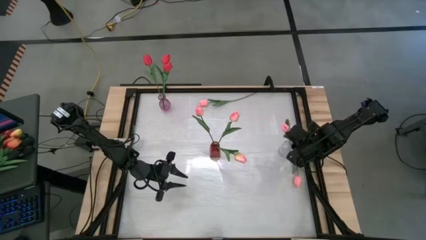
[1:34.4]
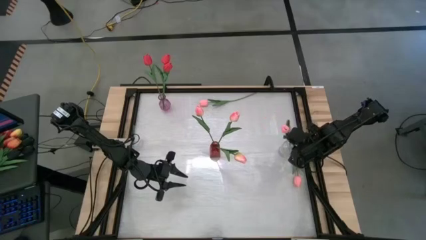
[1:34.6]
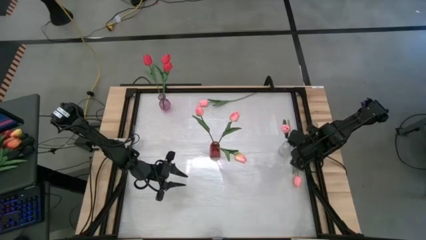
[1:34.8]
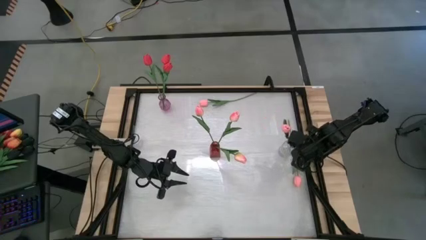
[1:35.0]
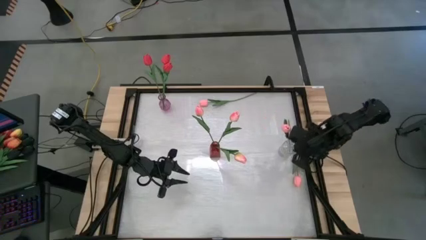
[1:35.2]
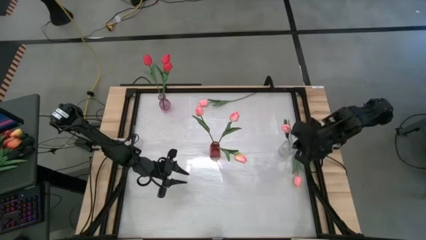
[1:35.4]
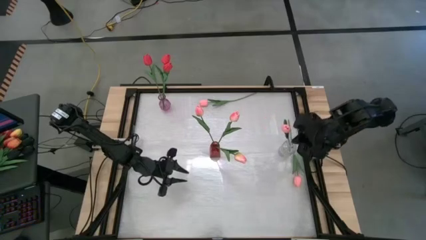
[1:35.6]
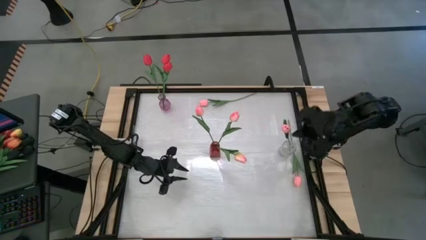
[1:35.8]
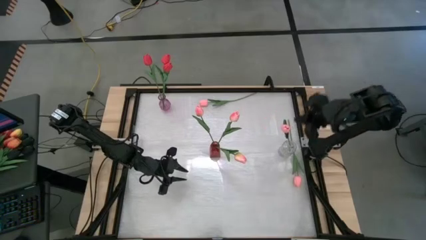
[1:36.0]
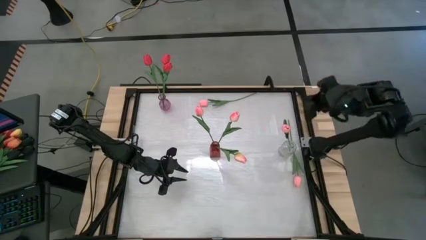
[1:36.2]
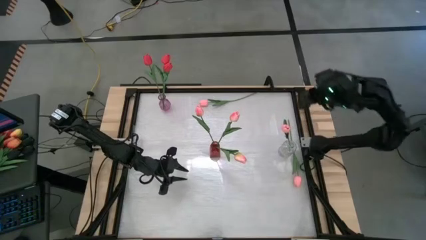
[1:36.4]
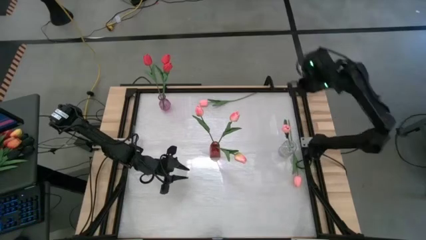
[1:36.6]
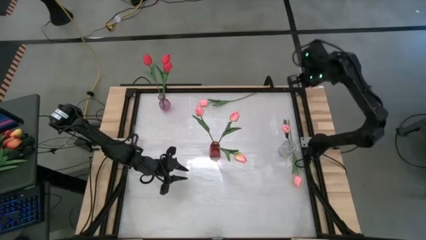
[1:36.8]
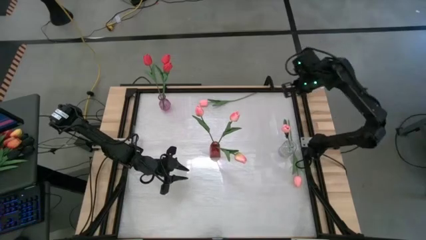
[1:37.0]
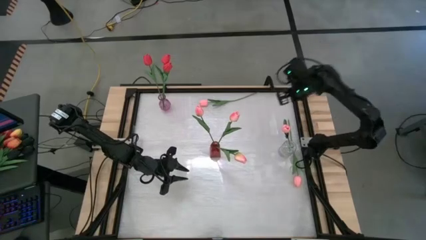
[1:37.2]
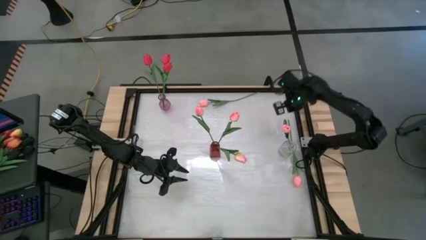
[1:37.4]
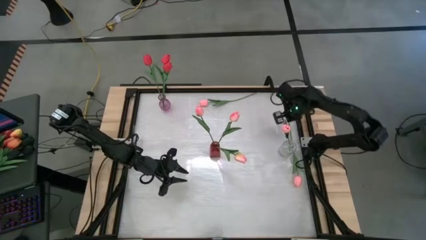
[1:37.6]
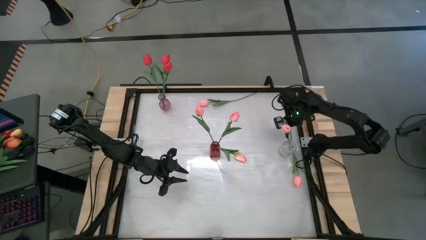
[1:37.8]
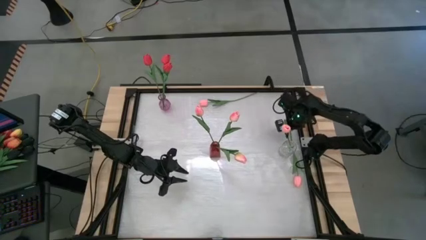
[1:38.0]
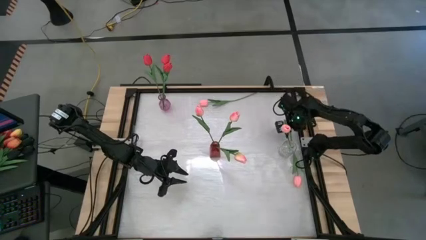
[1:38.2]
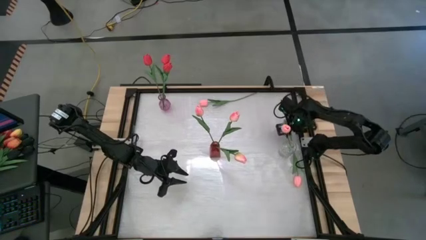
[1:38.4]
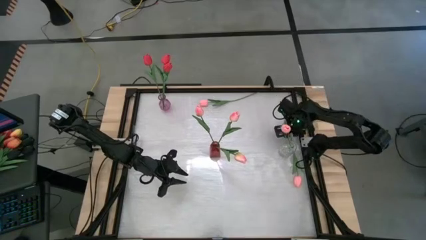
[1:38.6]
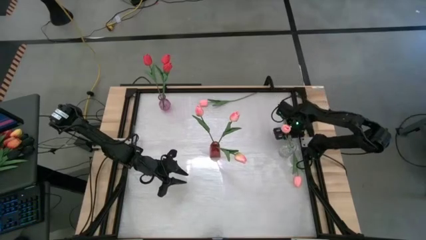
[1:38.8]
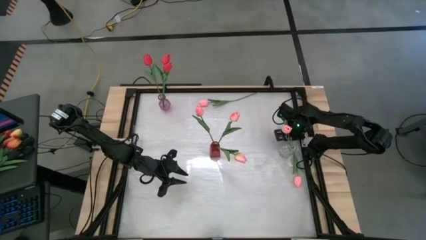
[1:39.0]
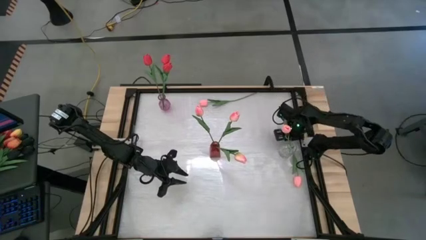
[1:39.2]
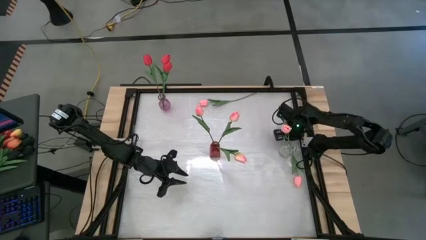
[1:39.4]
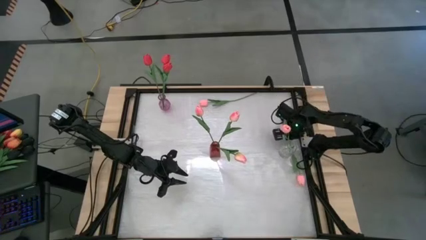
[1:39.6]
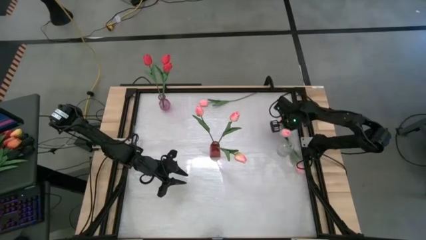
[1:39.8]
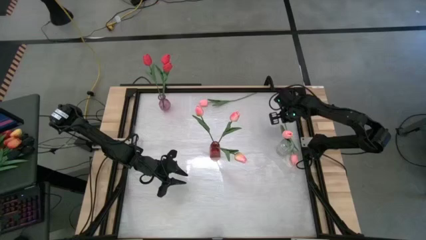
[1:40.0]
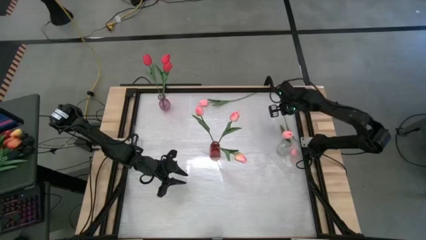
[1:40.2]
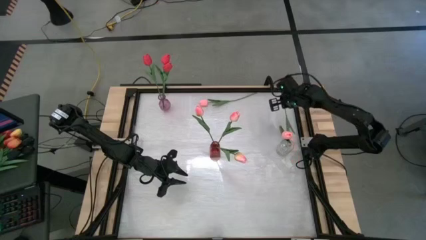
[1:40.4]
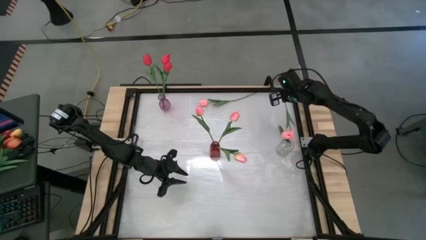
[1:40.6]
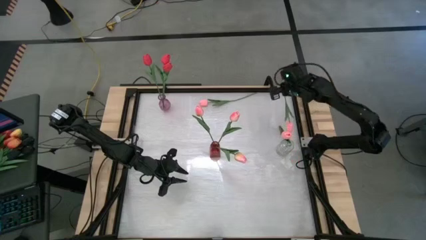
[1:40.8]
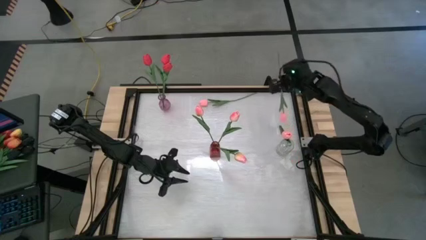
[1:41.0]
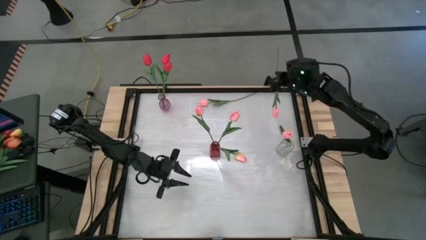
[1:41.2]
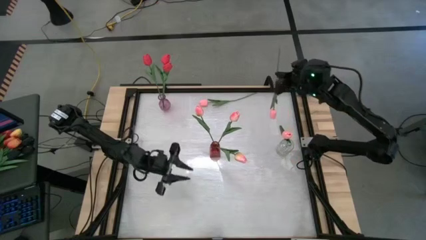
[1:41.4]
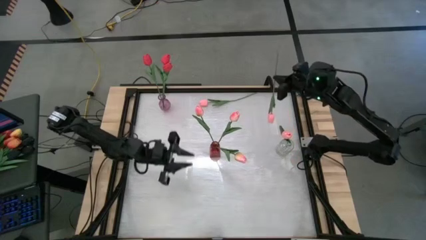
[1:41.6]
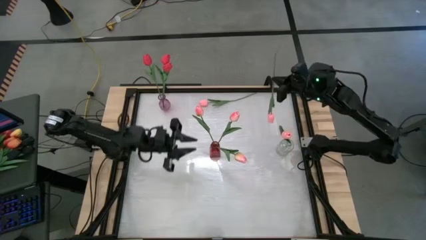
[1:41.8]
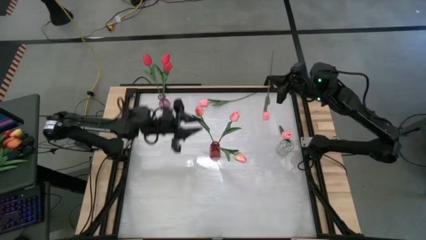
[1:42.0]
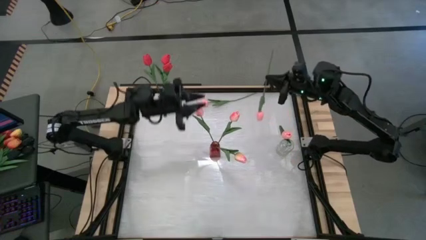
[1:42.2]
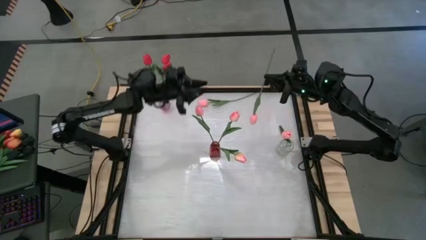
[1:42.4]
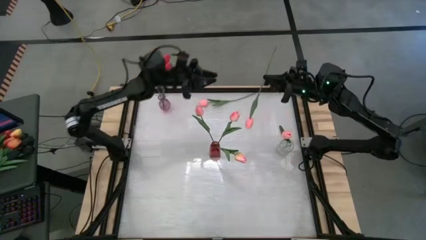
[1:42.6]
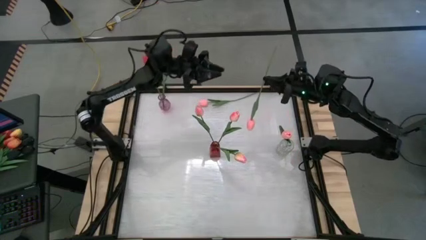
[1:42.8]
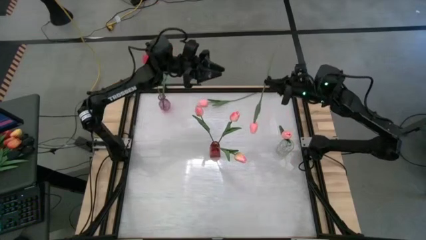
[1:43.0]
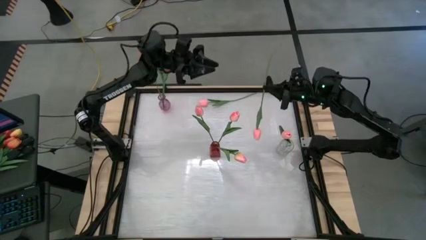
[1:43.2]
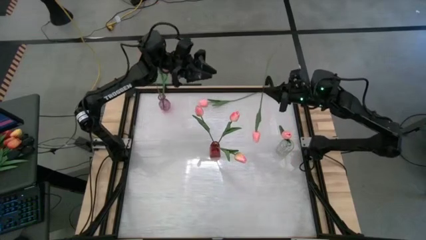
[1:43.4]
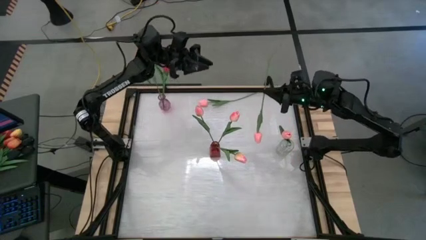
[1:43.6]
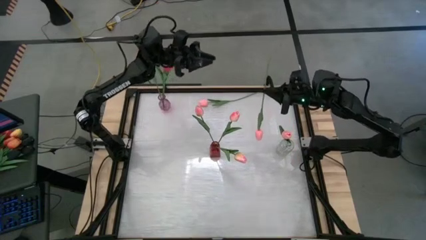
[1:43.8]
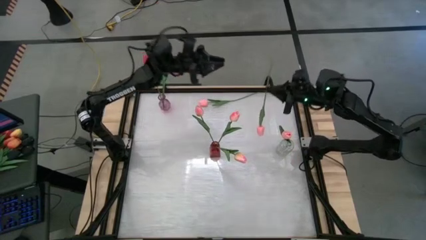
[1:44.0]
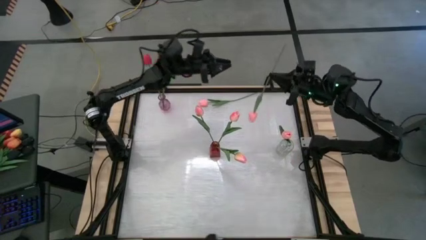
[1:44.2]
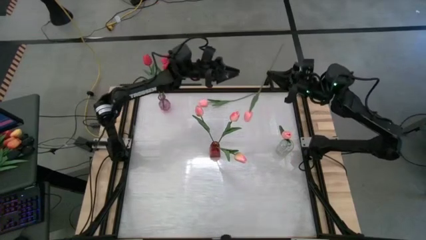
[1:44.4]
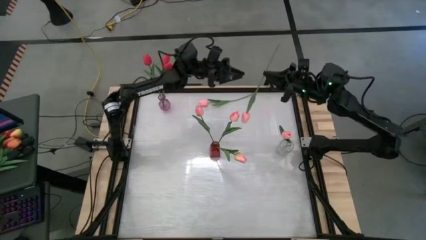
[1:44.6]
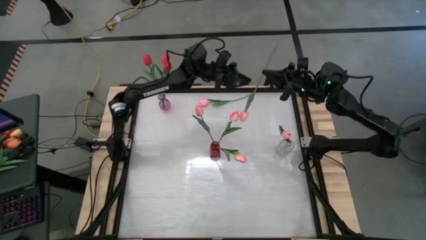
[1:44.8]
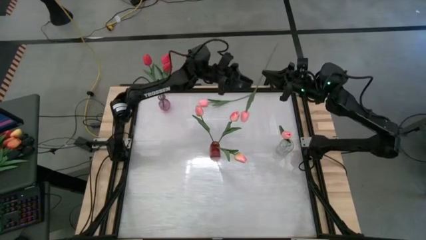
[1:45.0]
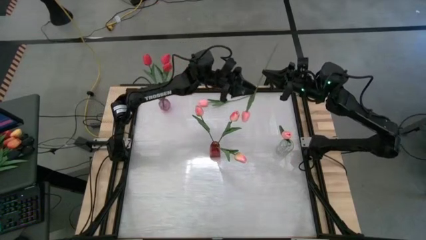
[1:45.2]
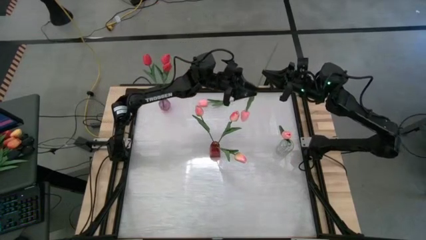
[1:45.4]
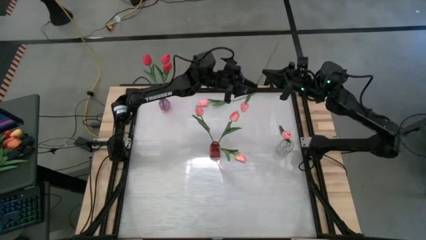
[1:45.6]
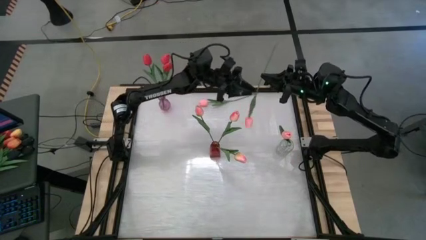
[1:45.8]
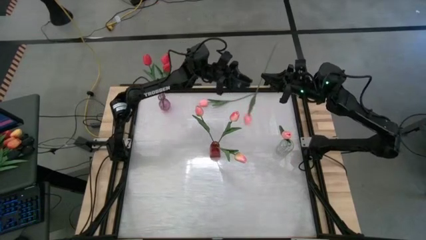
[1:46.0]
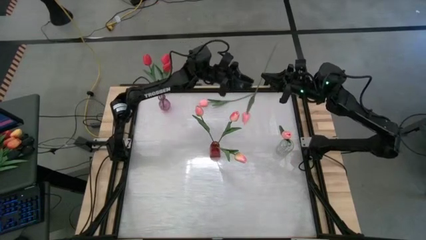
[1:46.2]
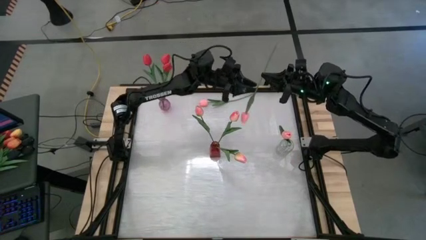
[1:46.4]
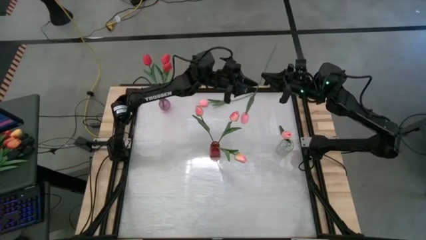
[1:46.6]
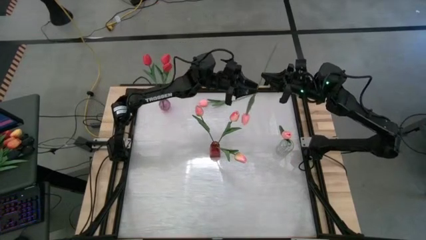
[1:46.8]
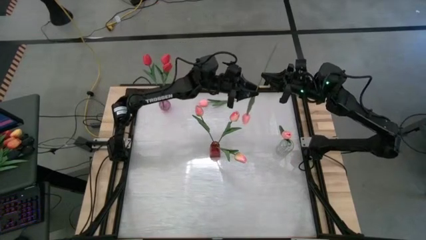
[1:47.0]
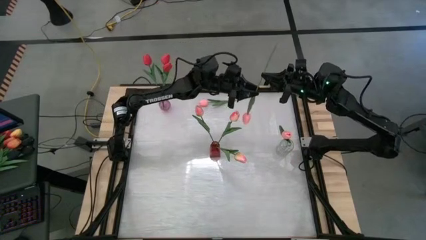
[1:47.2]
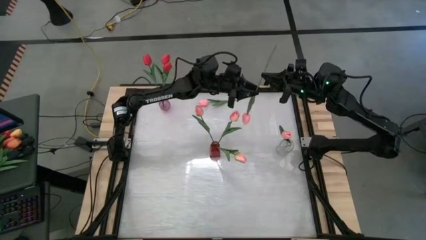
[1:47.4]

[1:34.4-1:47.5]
Task: Sort flowers into vase by color
Put the bottom pink tulip into the transparent vase
